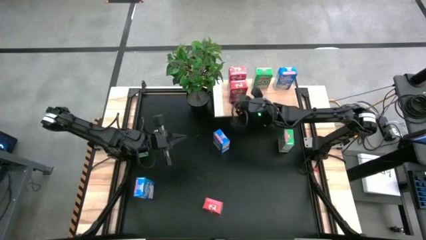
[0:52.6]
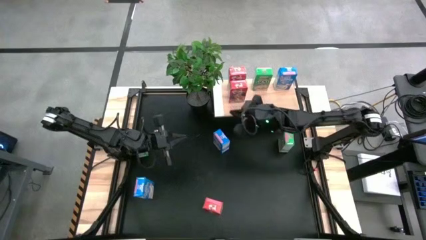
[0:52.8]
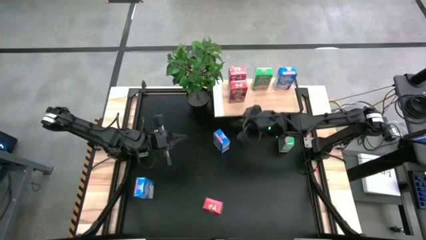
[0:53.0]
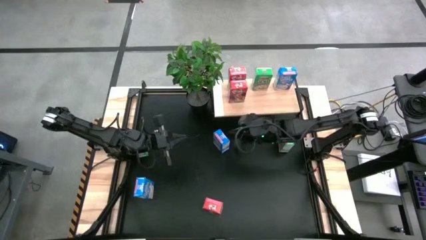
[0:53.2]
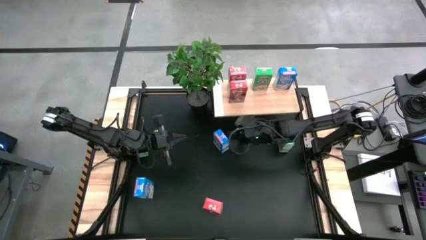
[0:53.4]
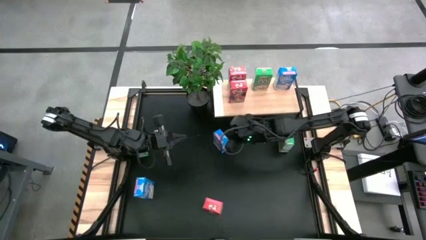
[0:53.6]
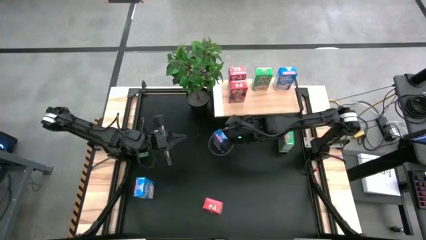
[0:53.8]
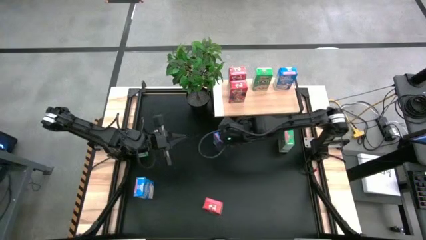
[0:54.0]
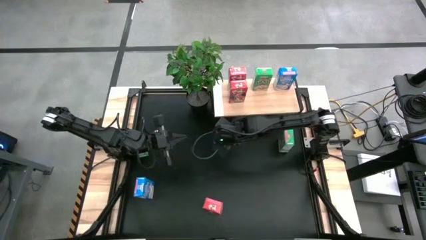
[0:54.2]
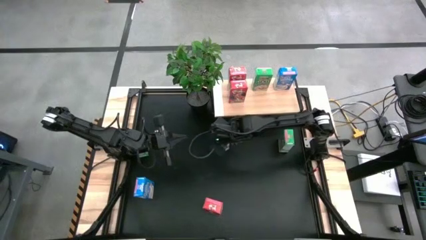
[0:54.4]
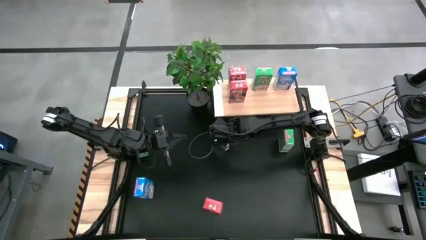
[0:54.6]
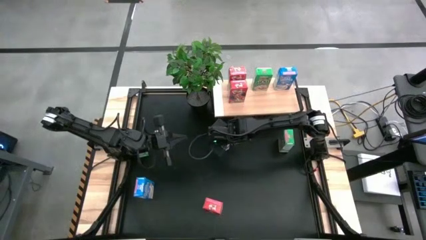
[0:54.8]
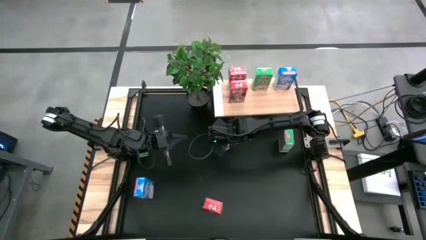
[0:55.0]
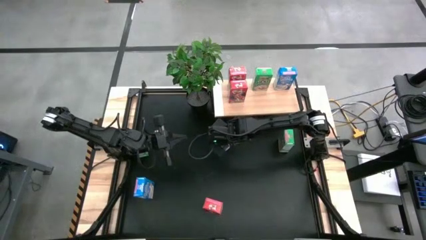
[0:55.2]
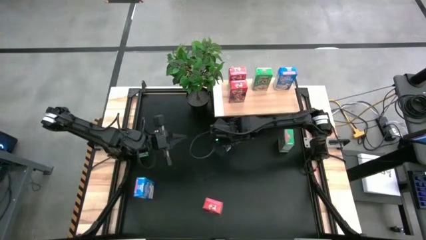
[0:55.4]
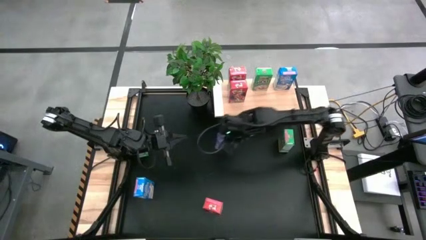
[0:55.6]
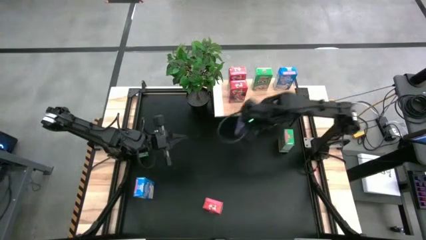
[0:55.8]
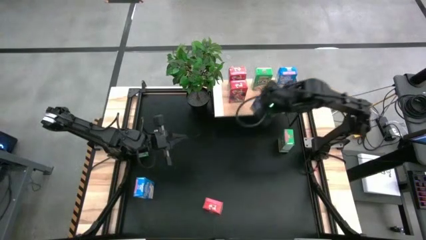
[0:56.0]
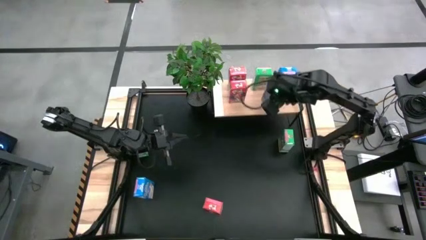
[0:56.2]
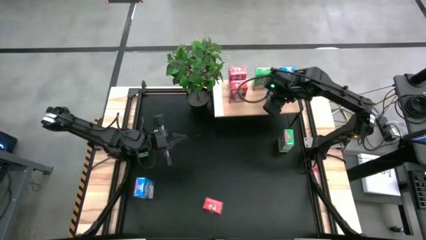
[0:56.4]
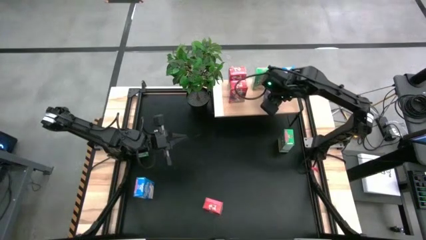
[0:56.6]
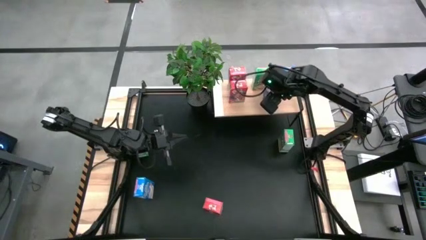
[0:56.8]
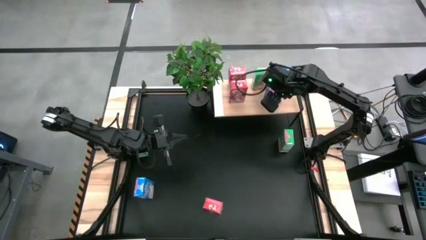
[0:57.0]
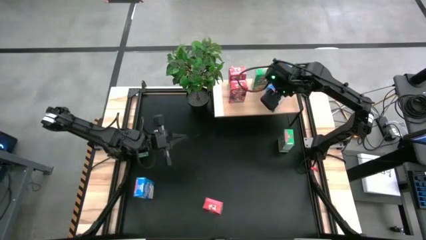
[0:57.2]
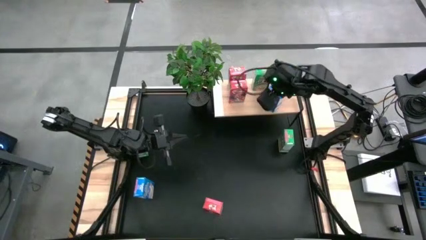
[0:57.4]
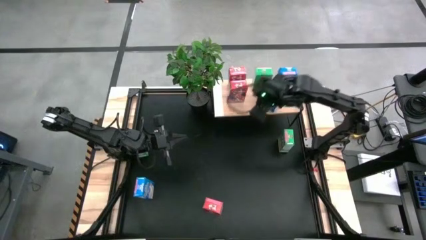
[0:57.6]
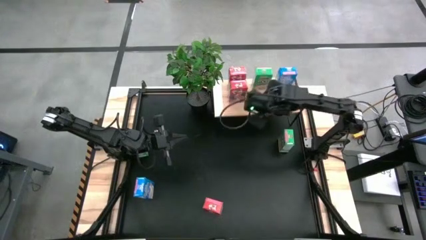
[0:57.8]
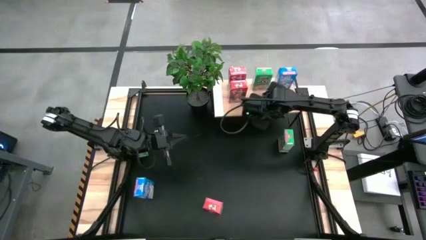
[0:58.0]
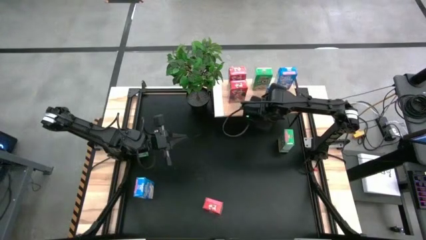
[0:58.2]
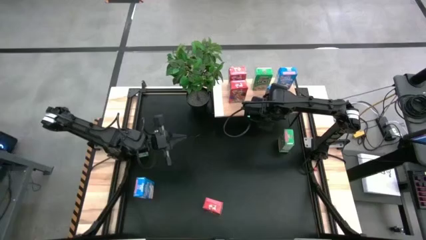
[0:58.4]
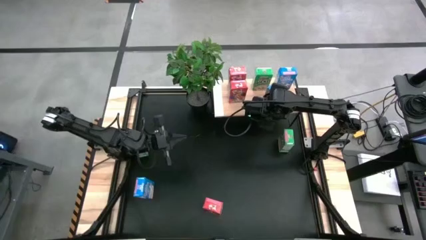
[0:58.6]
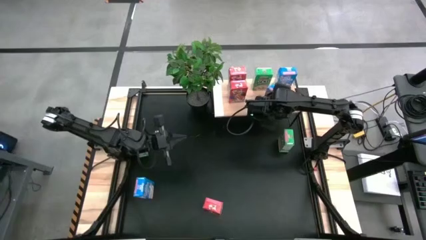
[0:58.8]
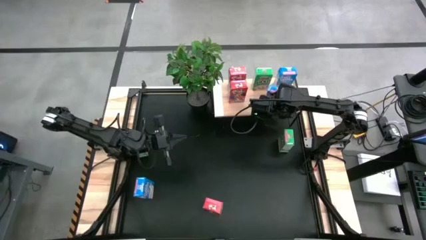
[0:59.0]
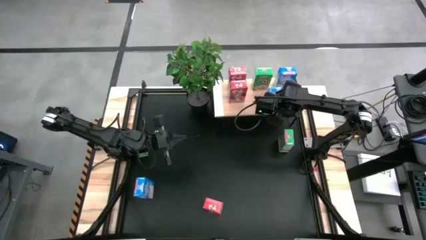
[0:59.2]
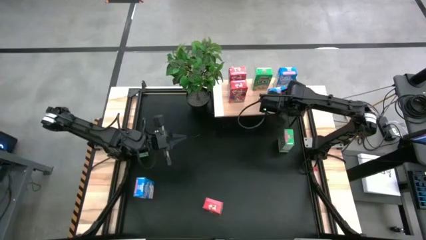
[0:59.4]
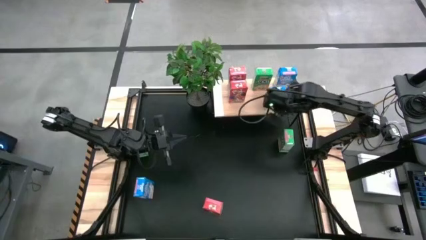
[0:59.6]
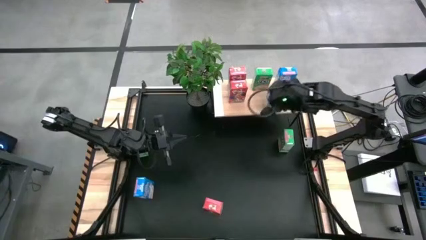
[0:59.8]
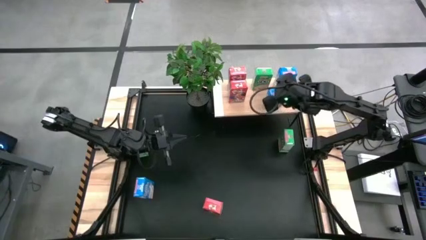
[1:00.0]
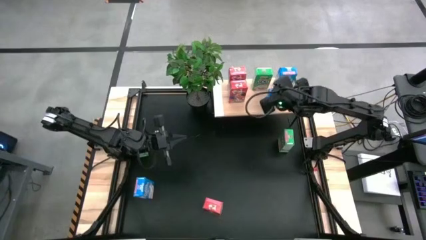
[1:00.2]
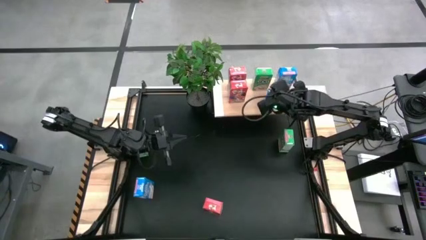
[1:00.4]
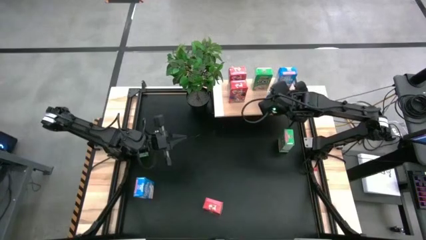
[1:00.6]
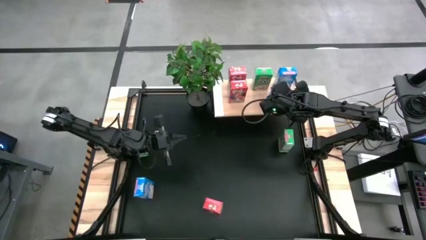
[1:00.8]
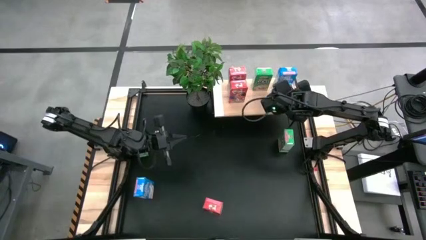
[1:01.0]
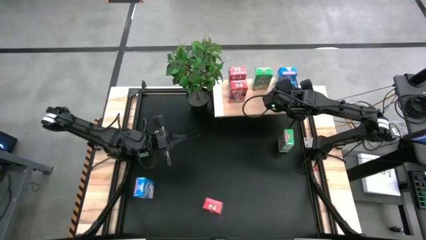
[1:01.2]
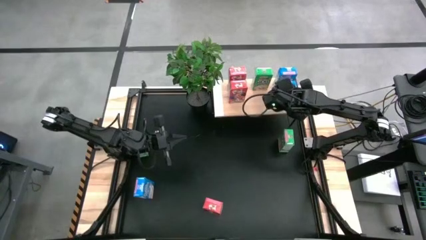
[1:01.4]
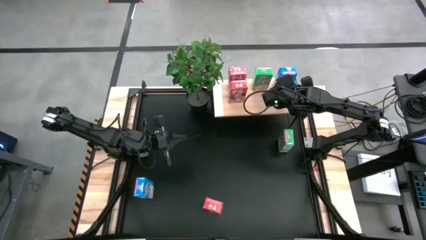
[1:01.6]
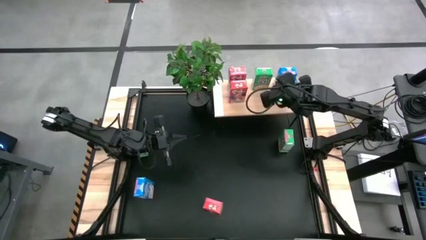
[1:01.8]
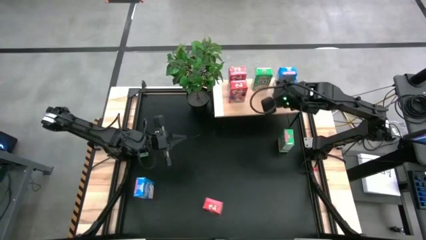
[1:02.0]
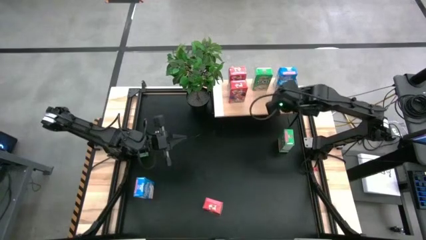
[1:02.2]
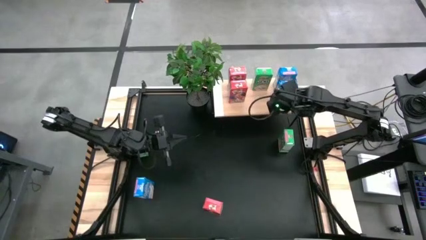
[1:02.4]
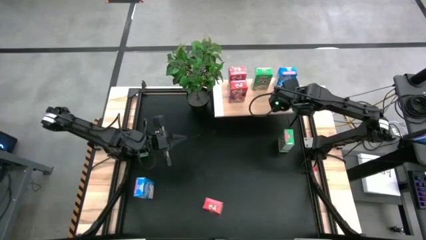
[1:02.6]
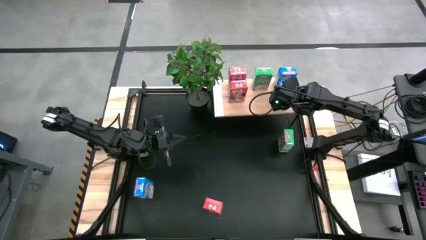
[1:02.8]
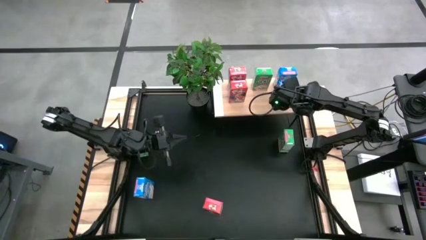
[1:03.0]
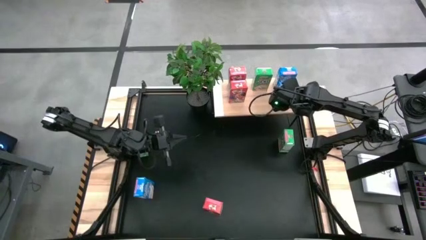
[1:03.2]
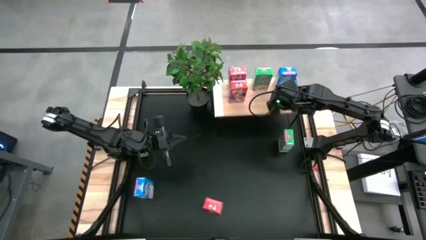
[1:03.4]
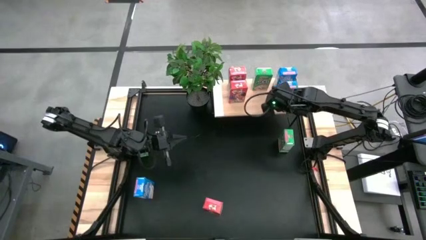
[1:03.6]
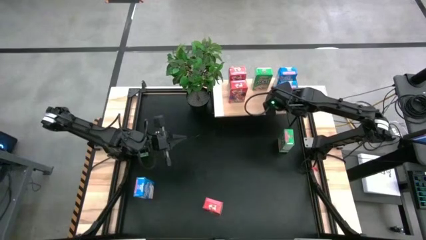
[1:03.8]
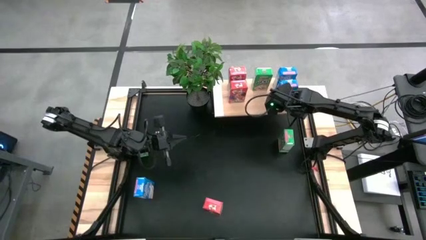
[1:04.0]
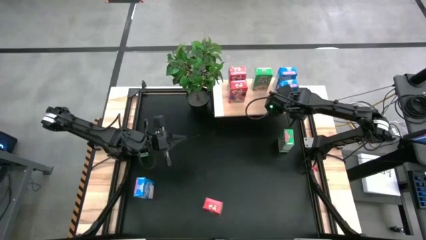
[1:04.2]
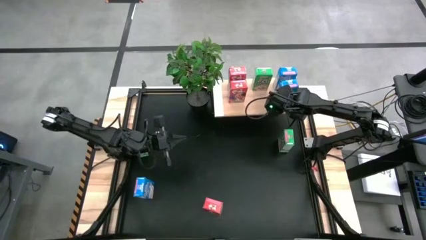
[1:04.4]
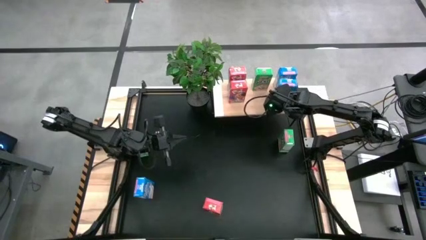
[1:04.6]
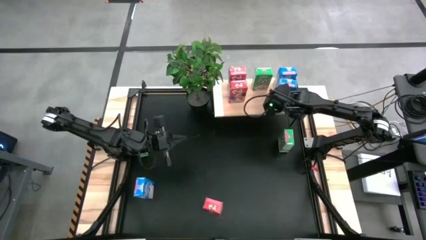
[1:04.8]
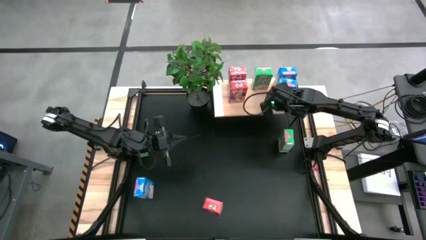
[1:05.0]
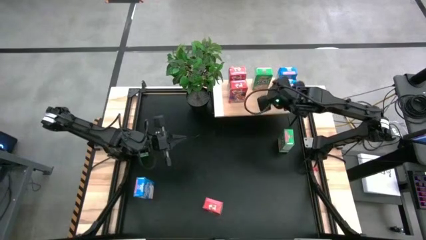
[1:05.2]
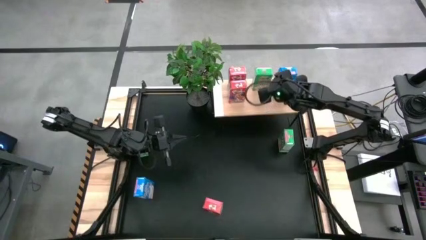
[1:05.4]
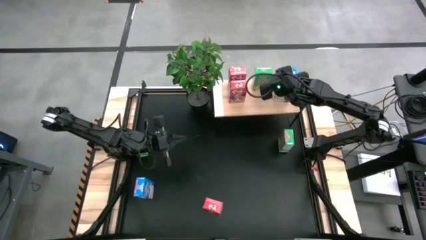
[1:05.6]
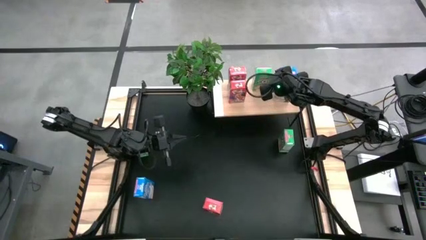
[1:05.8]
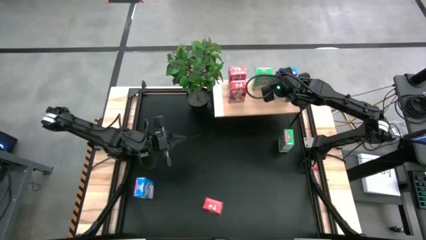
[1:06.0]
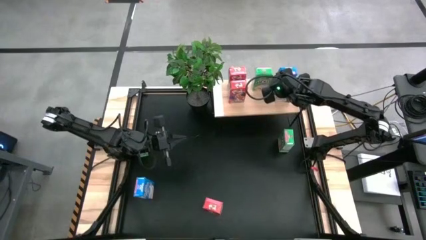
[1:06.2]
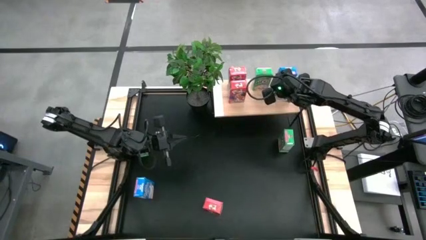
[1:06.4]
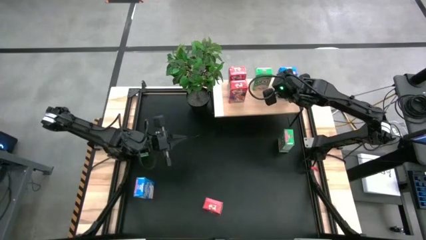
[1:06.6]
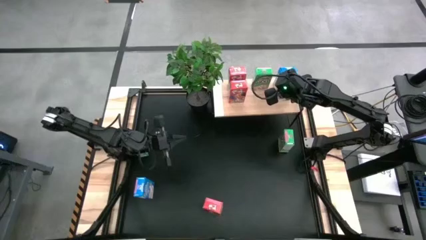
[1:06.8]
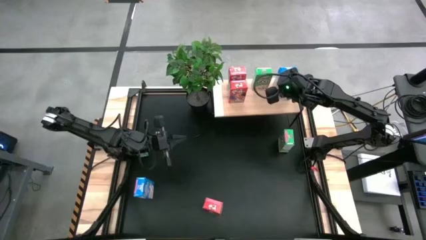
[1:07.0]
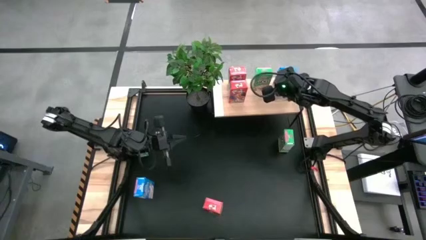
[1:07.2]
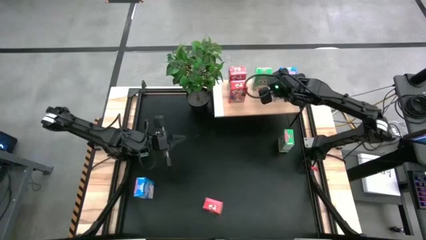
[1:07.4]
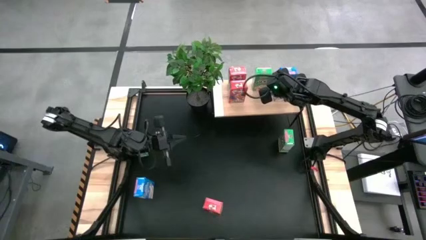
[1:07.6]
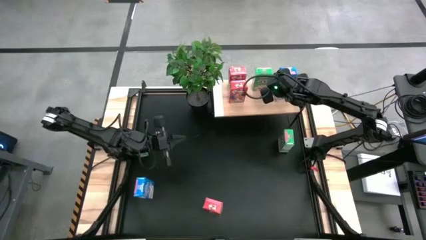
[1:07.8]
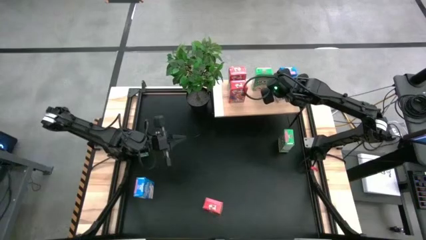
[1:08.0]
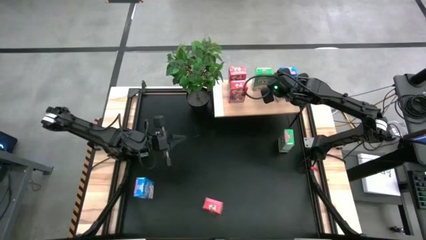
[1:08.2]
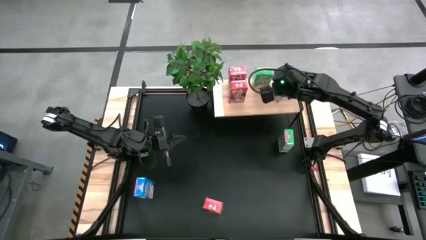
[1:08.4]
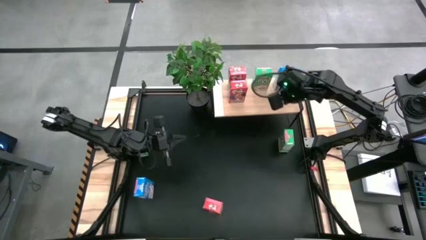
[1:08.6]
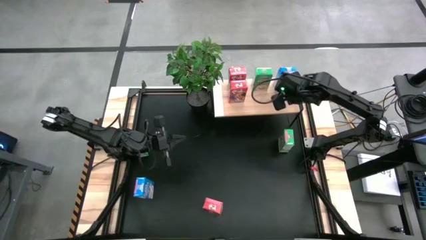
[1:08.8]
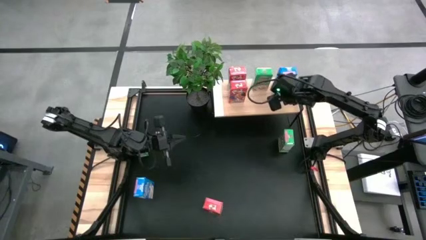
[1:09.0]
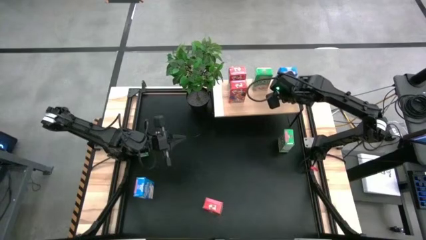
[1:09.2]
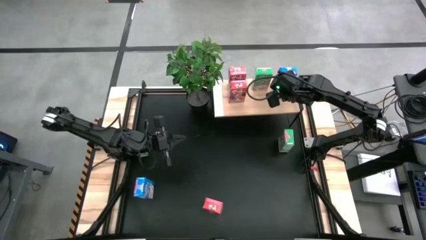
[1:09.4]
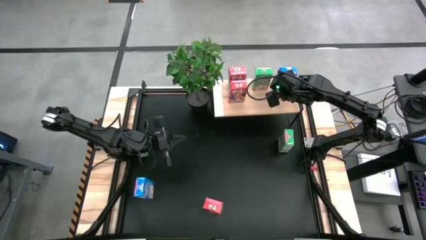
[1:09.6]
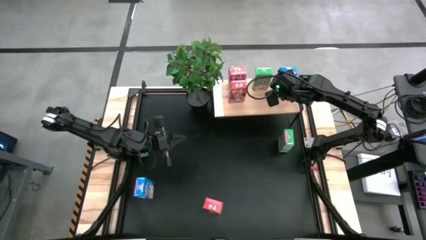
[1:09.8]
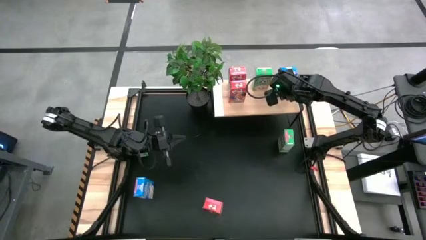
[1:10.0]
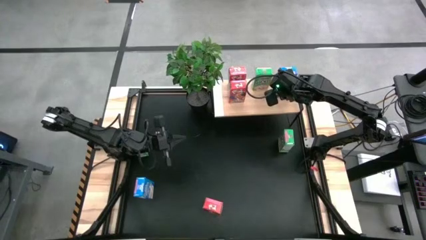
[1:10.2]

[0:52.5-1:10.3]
Task: Stack cereal on shelf
Put the right blue cereal box on the shelf
